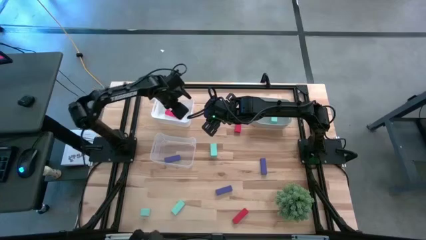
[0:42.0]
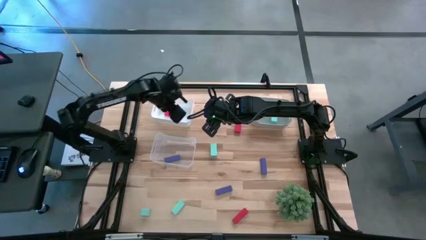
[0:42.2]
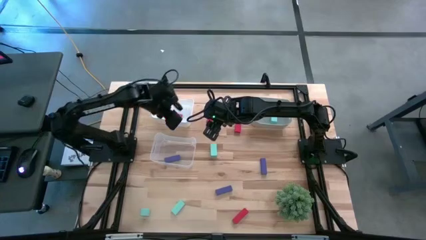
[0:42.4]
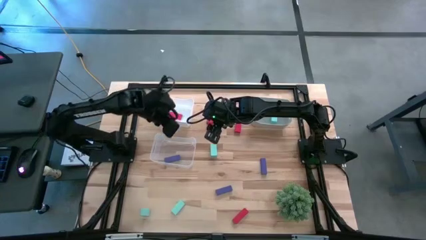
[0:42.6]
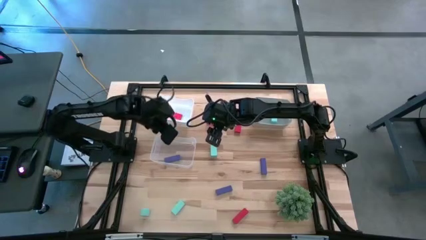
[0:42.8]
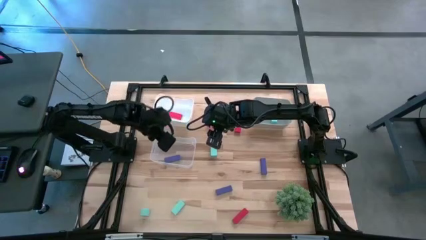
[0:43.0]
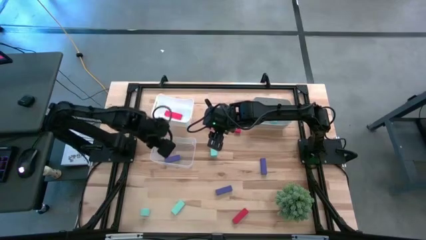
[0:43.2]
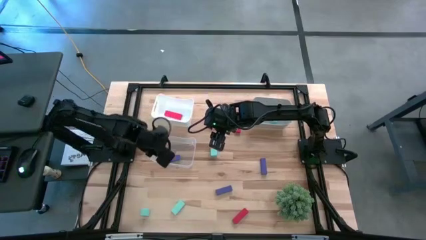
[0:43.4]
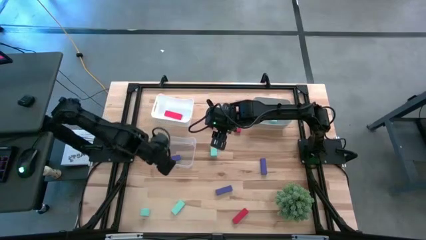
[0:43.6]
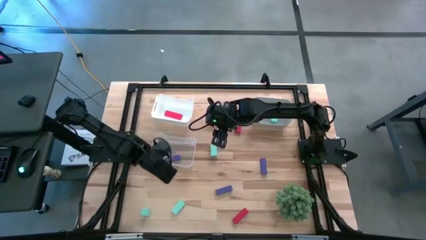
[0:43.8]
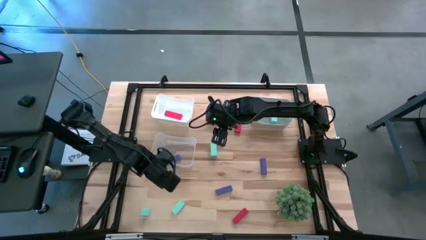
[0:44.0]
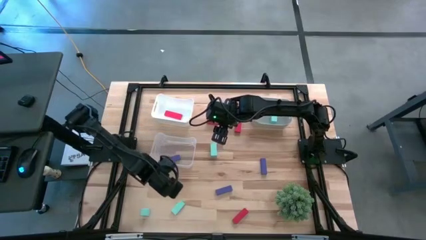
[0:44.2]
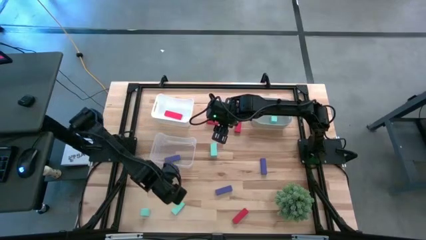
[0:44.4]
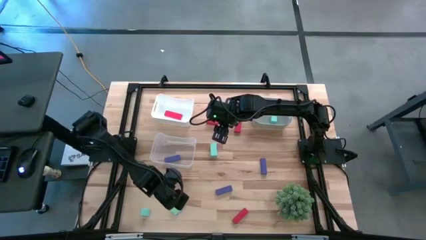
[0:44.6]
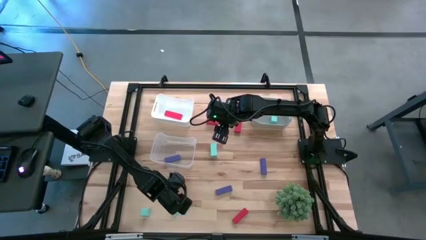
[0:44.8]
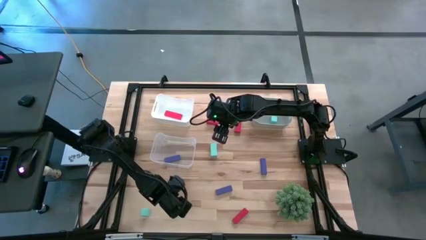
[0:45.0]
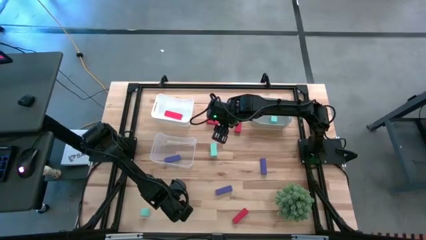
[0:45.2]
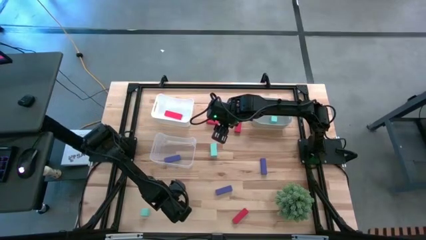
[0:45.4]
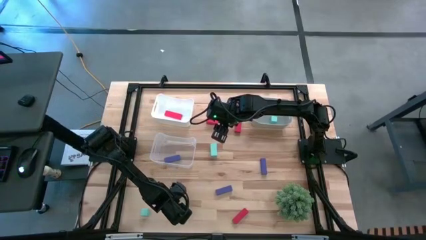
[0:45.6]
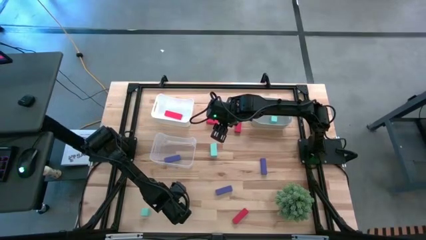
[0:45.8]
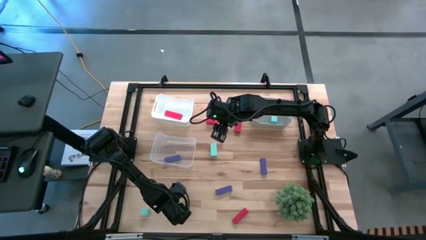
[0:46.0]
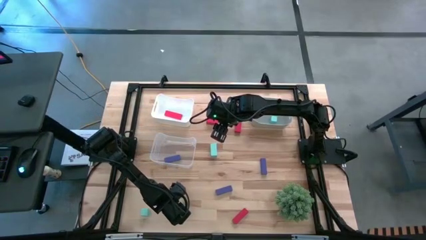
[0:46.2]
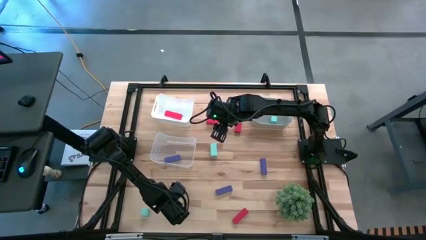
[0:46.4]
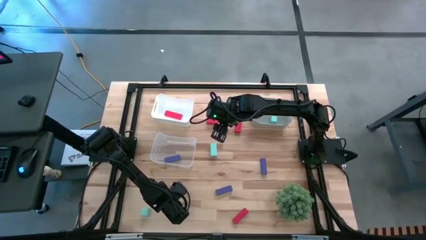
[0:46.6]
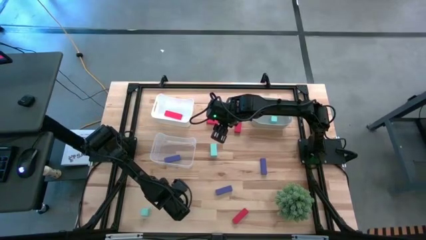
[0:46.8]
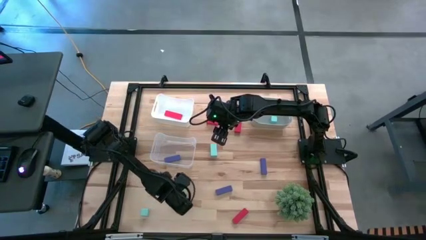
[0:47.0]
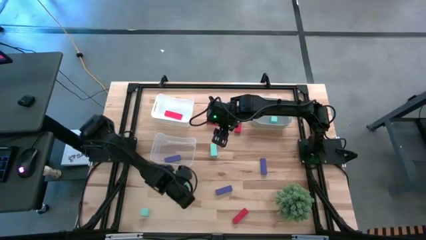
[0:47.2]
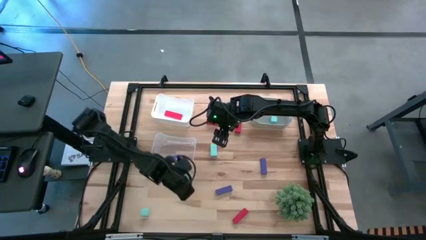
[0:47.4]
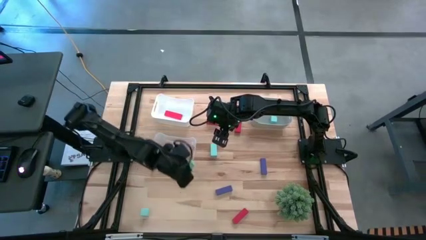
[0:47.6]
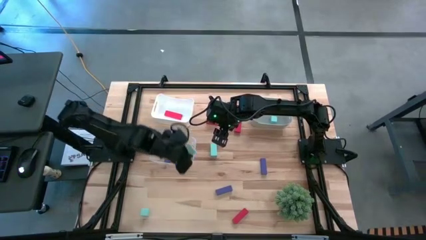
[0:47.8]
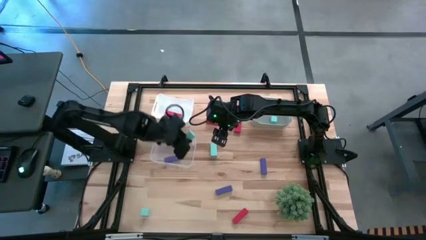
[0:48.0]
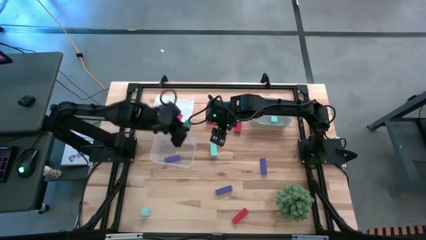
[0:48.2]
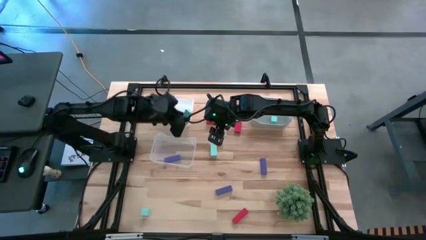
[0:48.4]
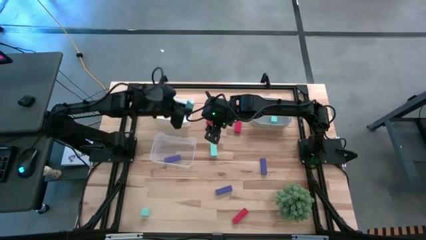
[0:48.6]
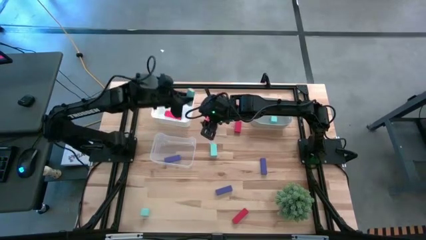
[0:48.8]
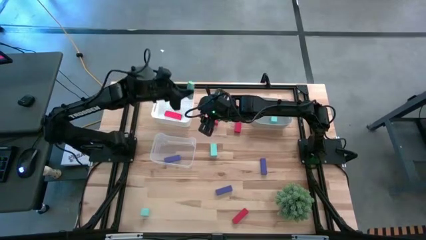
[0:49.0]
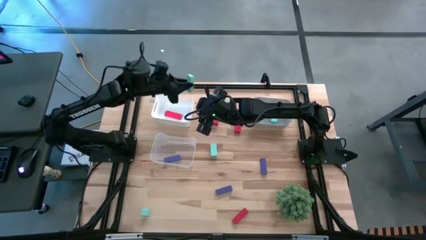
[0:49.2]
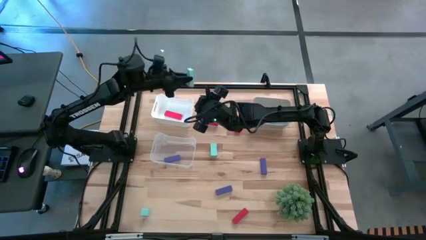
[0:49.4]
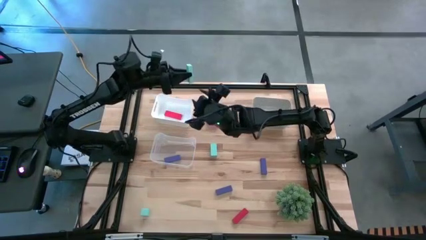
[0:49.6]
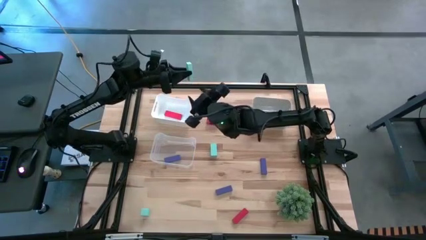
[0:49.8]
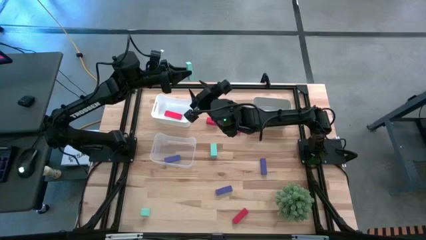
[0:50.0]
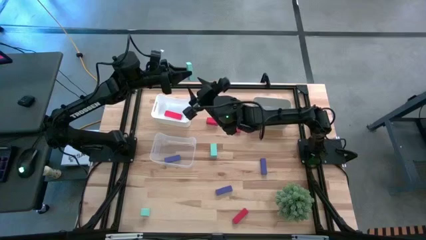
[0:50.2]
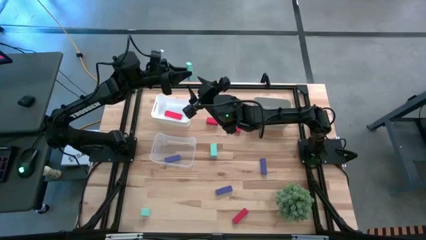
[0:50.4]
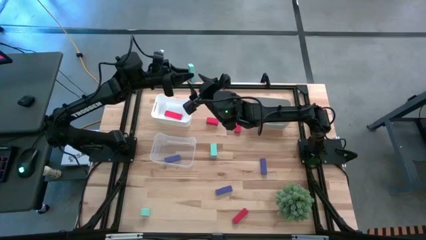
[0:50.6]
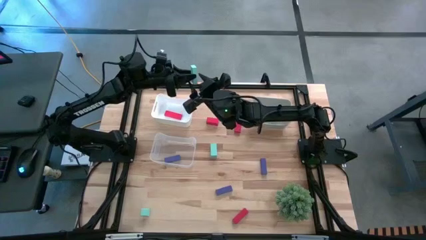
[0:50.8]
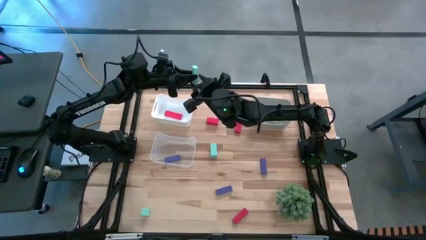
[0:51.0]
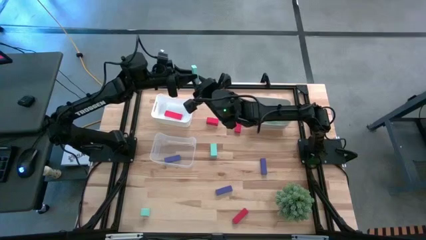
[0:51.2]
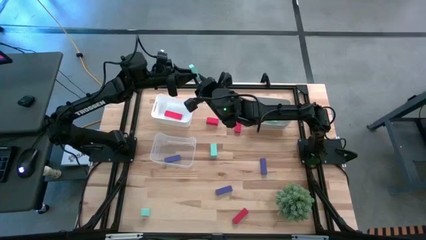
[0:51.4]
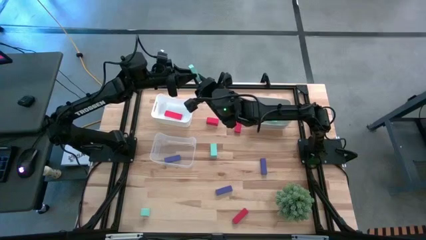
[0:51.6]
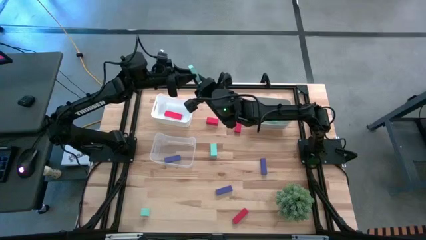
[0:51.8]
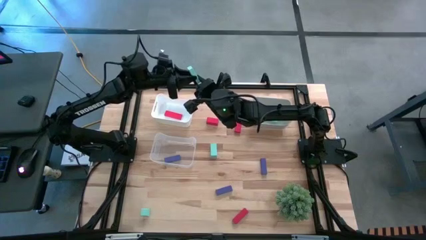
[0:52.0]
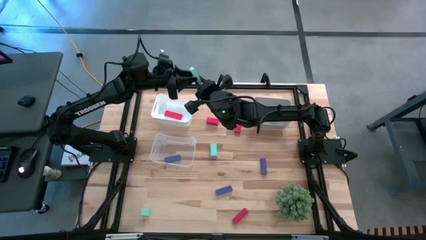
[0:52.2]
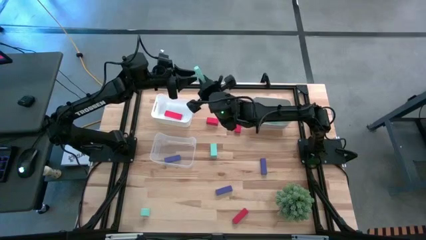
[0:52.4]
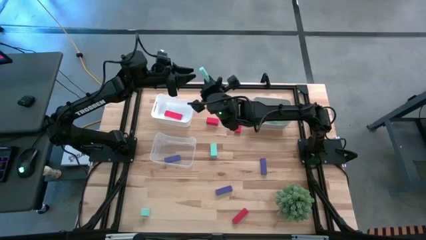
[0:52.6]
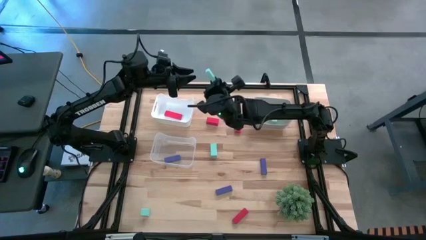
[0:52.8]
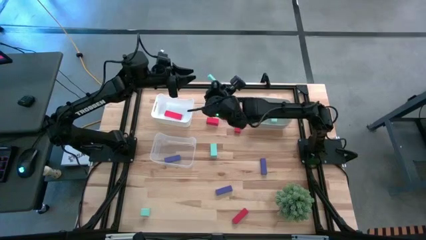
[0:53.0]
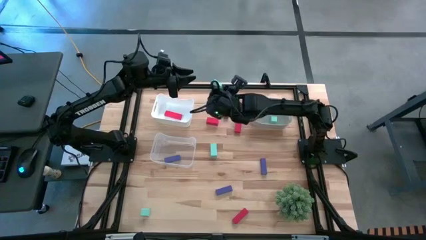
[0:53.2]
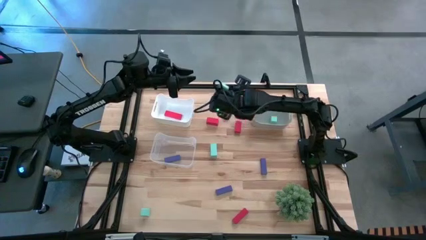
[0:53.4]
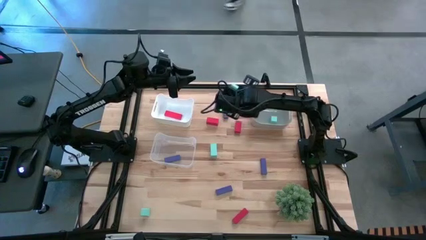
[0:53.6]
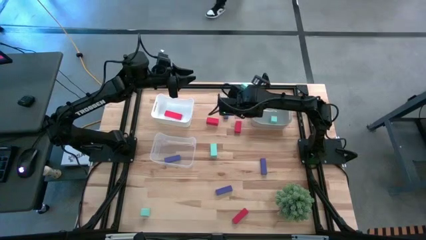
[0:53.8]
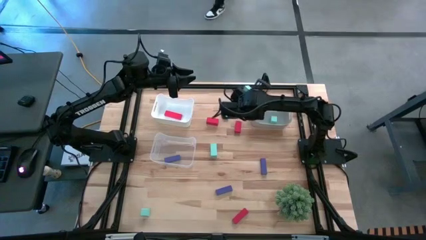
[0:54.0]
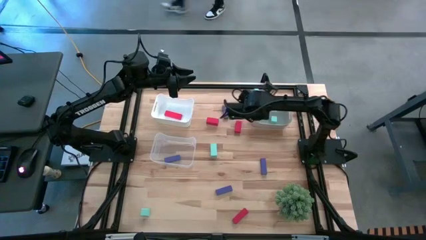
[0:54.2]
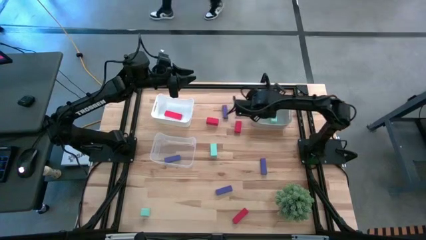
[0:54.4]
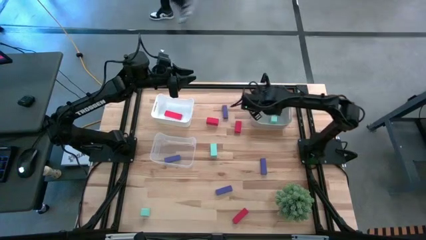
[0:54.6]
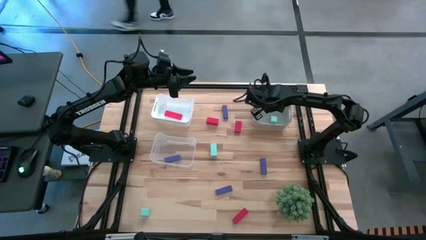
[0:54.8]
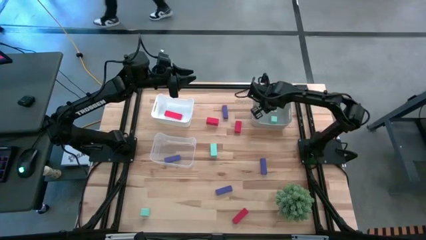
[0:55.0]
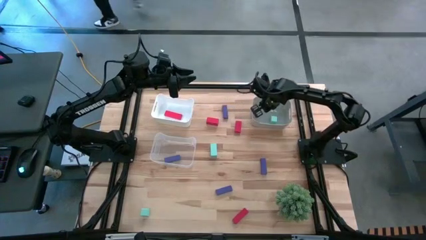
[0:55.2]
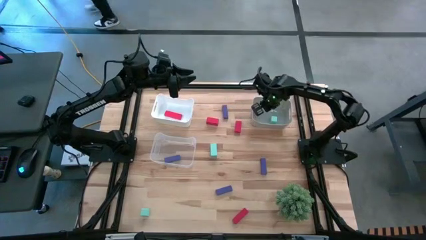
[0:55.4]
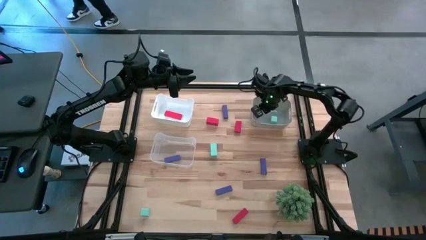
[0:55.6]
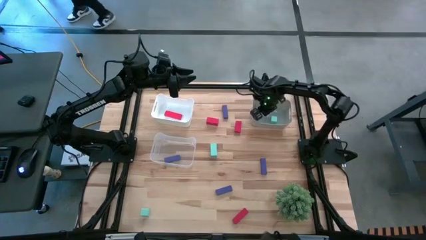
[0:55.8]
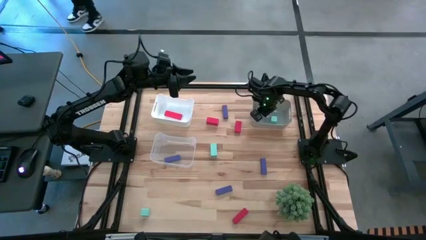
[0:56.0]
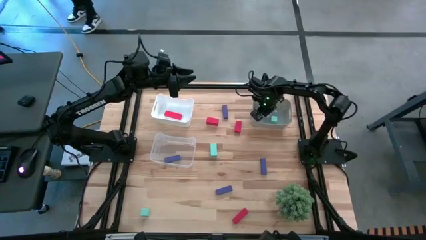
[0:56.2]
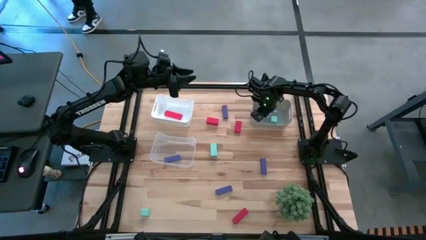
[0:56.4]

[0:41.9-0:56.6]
Task: Sort & place blocks by color
Put the light blue block into the grey bin
